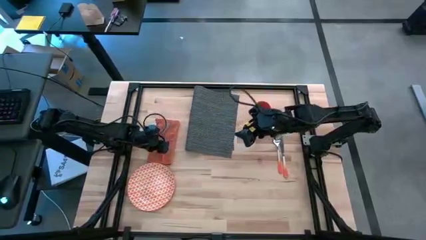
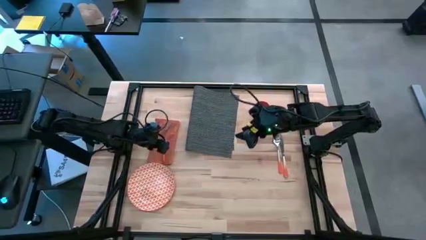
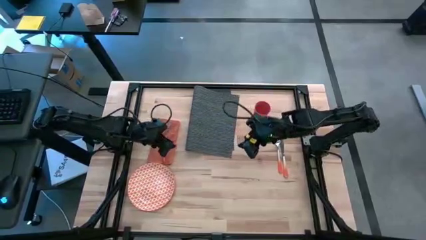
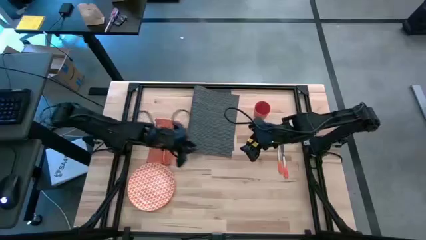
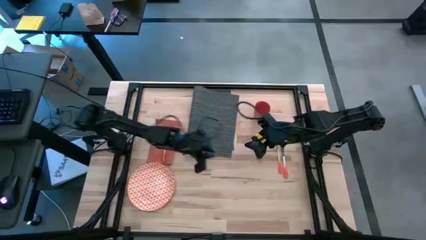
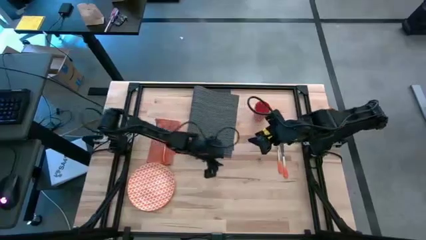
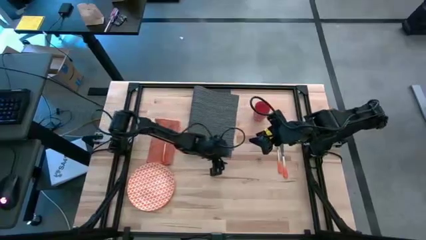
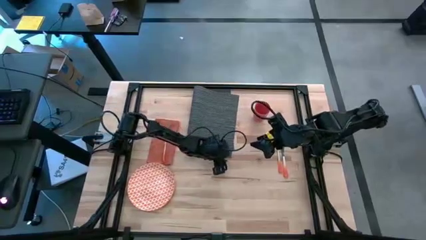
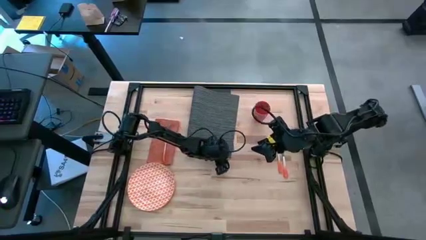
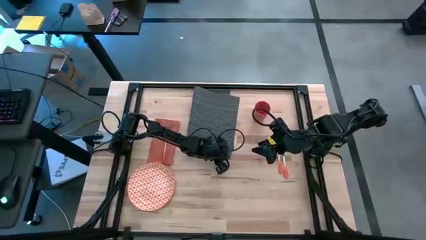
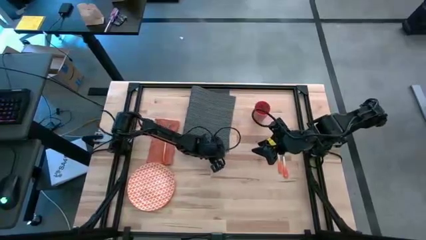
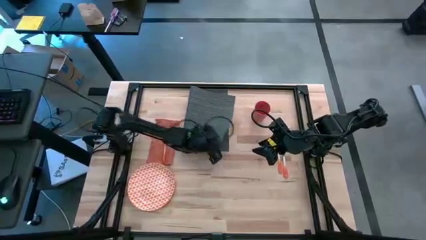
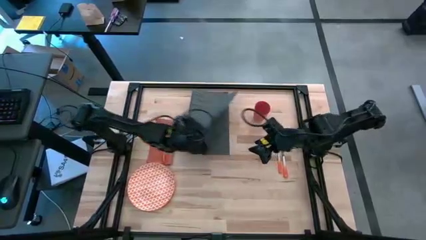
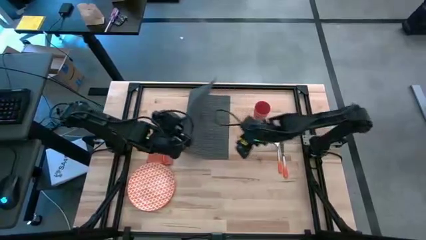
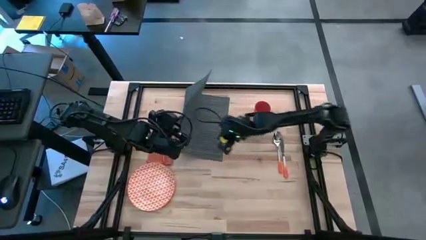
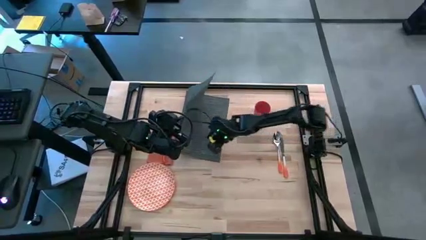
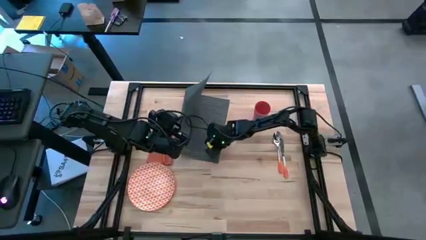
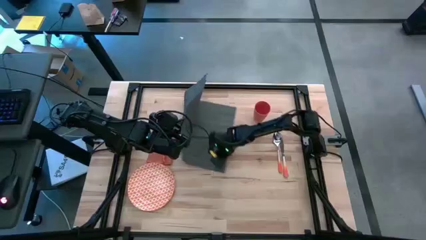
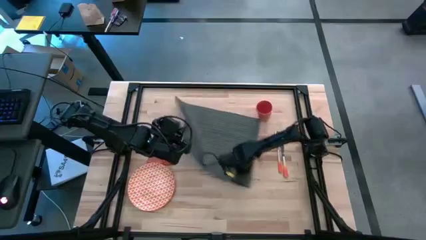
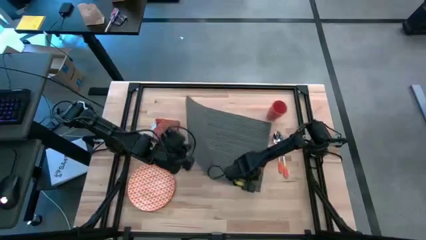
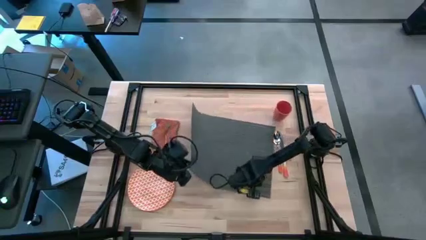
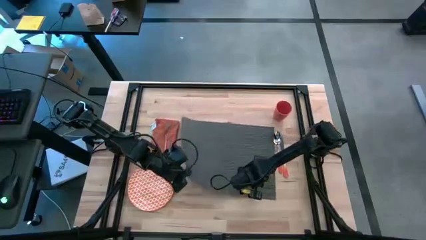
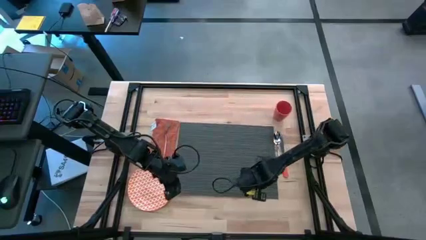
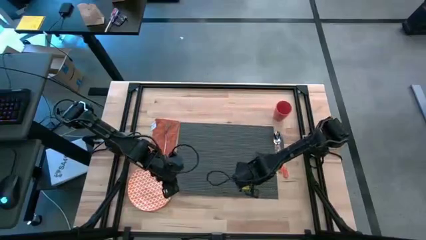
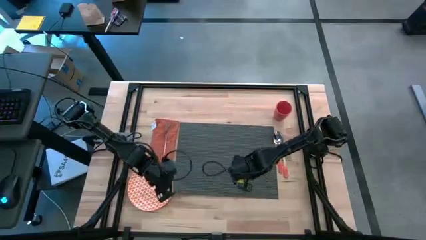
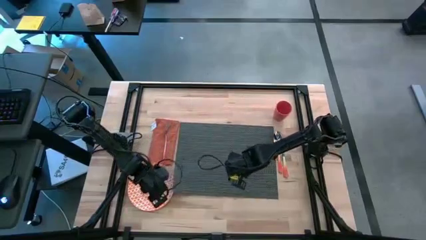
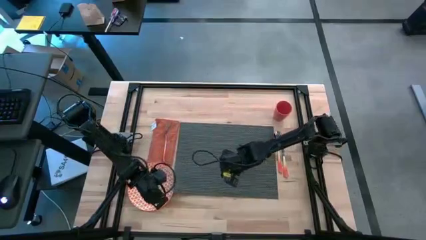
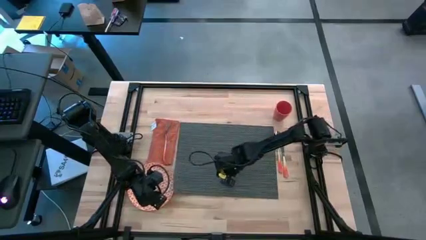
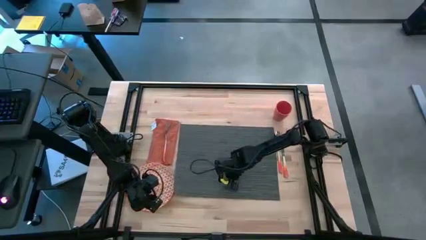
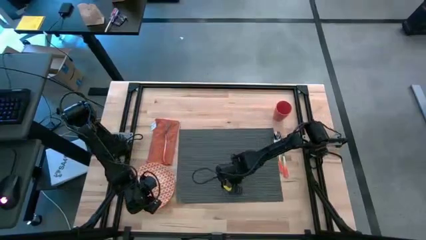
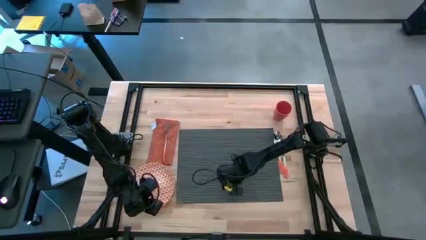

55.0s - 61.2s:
Task: Set table place
Prepare the table mat

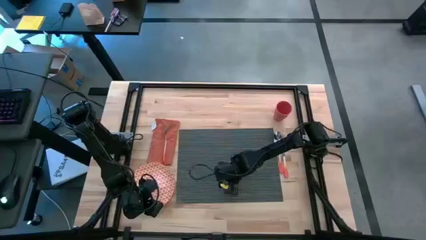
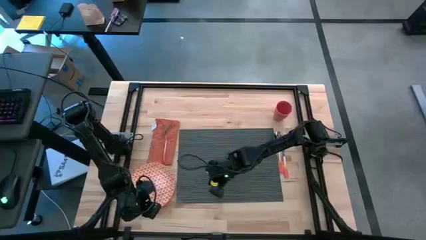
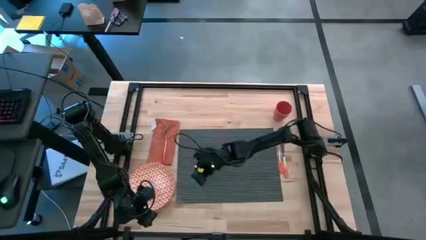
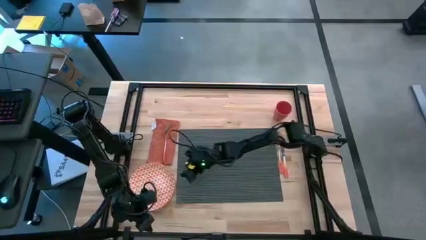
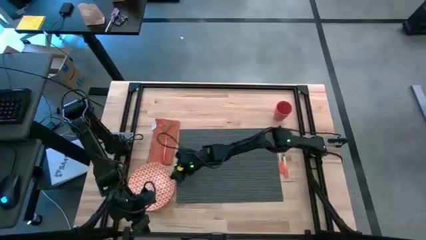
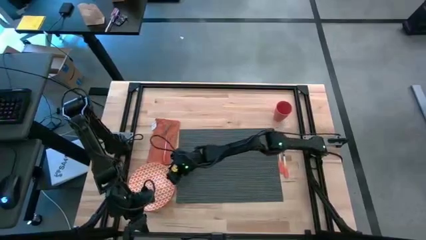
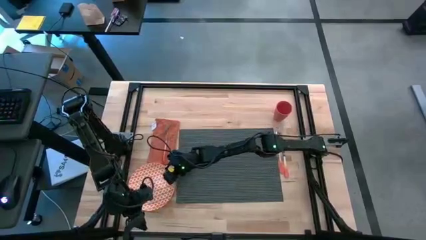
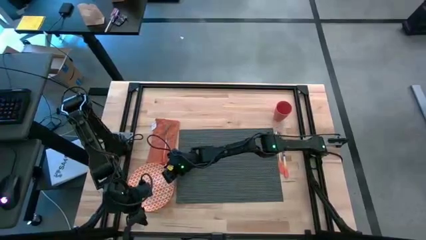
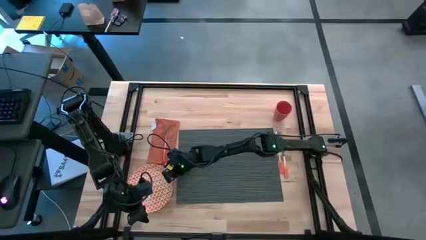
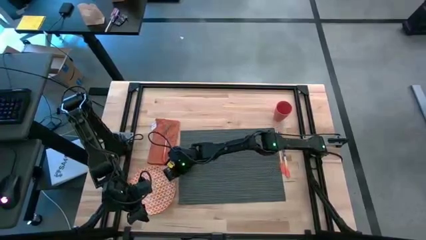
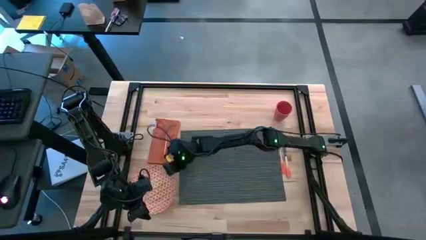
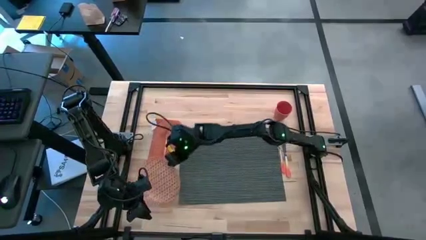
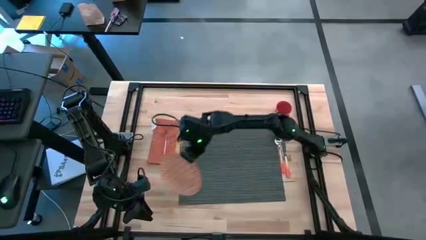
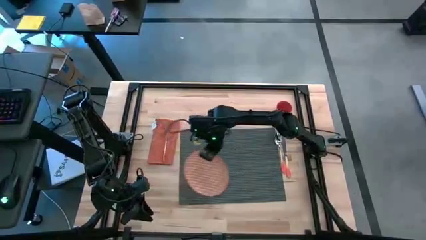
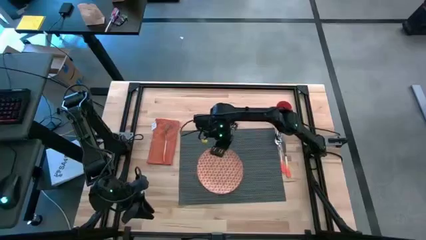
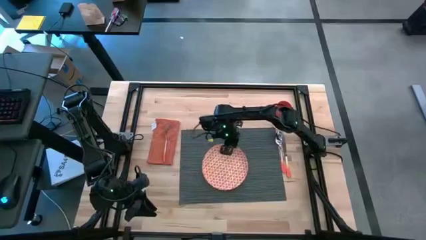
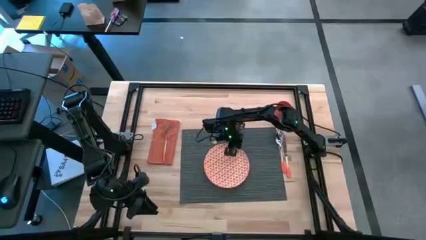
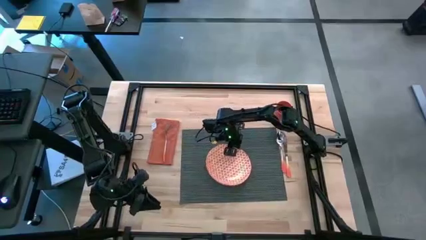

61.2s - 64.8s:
Put the orange plate on the table mat

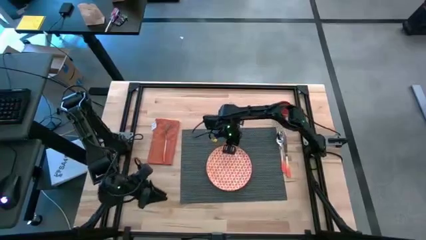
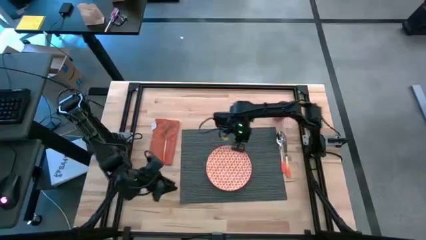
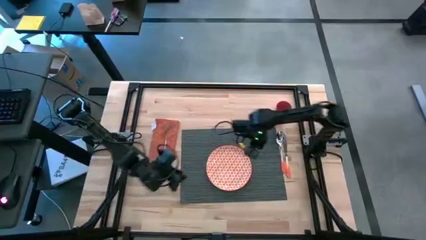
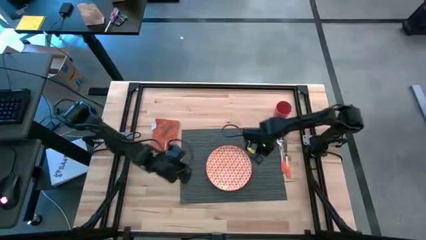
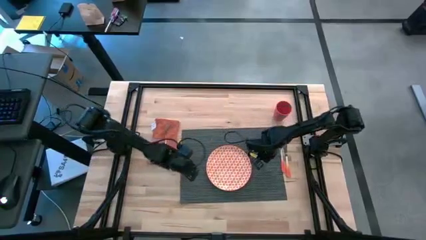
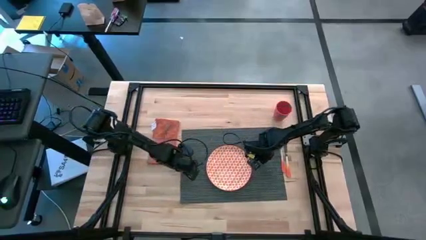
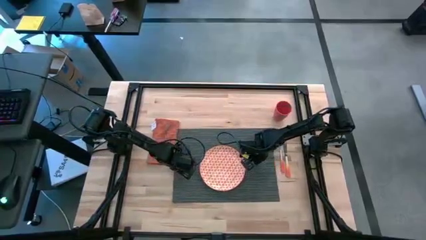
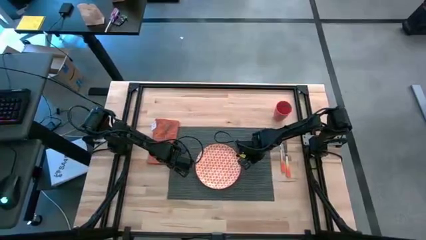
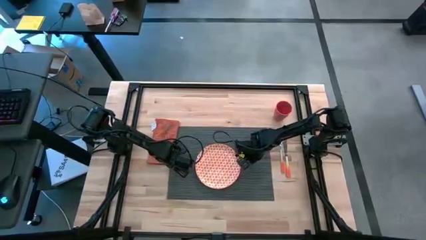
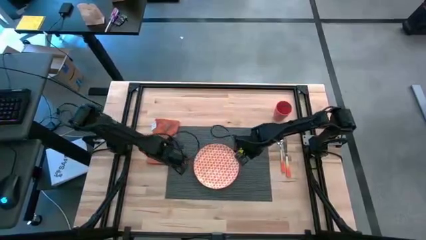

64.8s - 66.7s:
Adjust the table mat

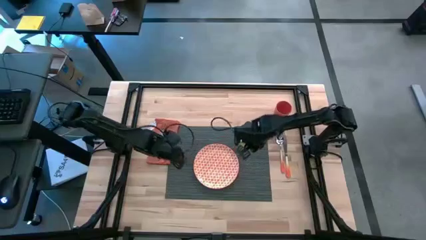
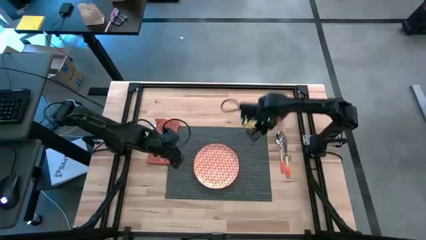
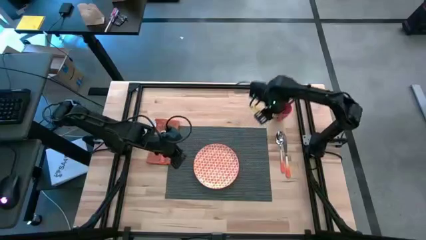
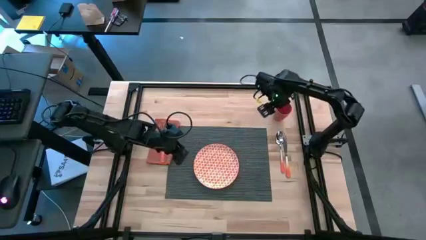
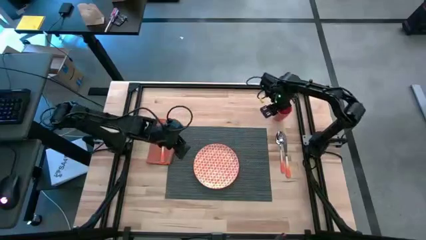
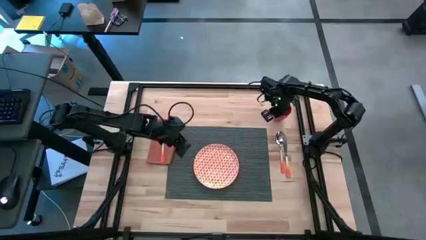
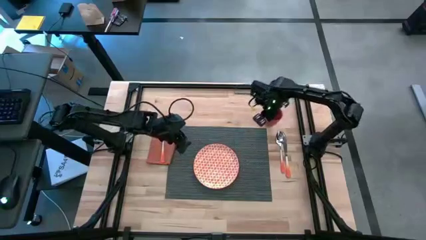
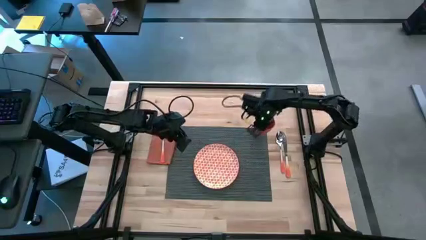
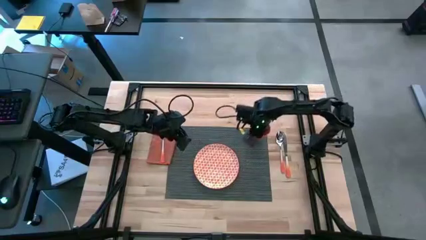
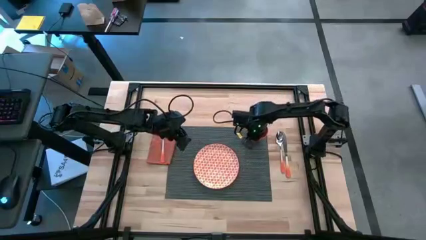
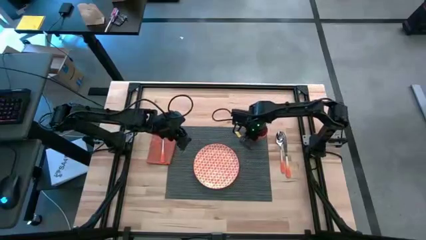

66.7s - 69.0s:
Put the orange cup to the top right of the orange plate on the table mat

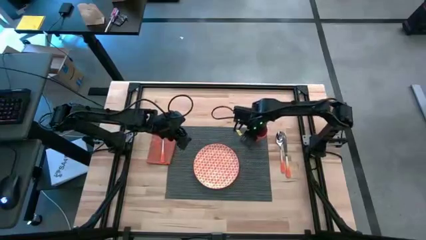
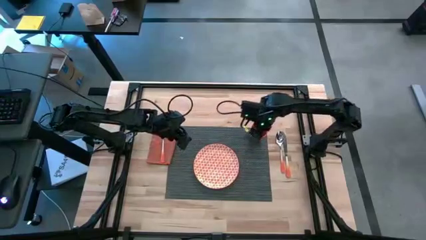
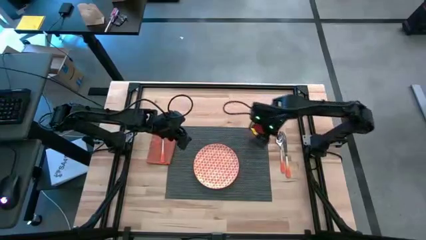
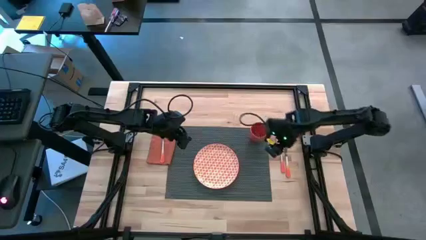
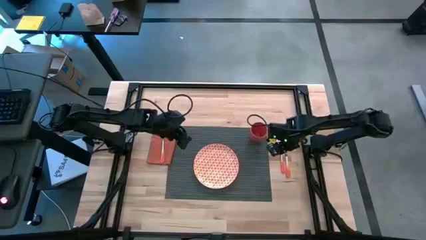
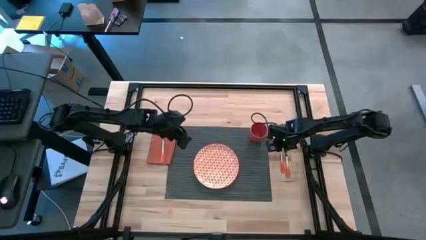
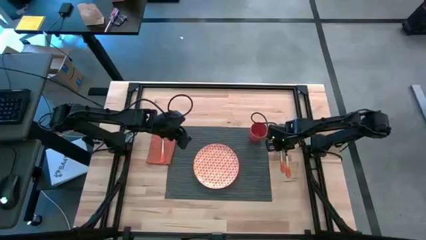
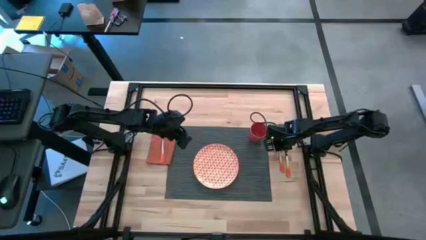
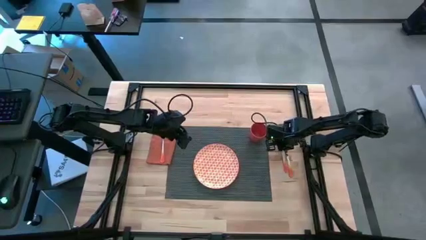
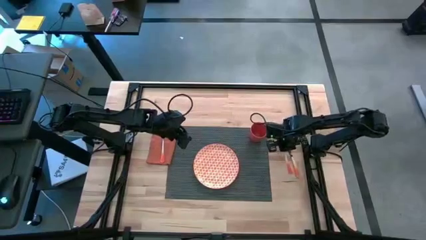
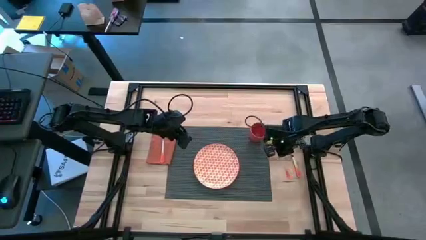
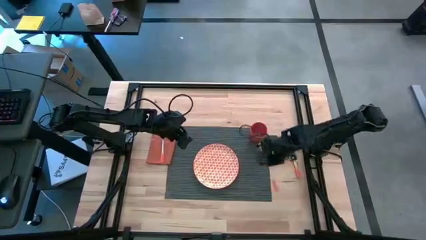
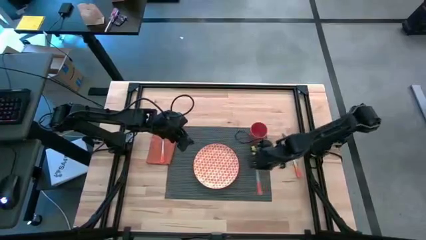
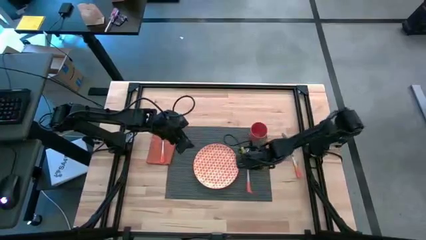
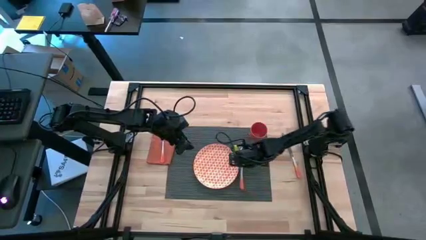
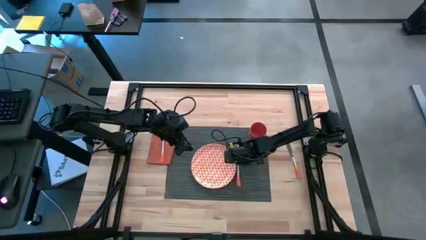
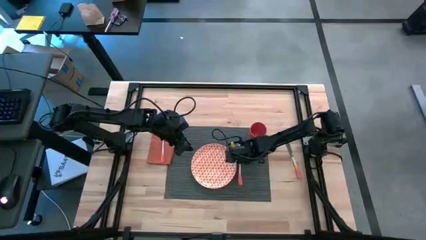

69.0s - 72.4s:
Put the orange spoon to the right side of the orange plate on the table mat
